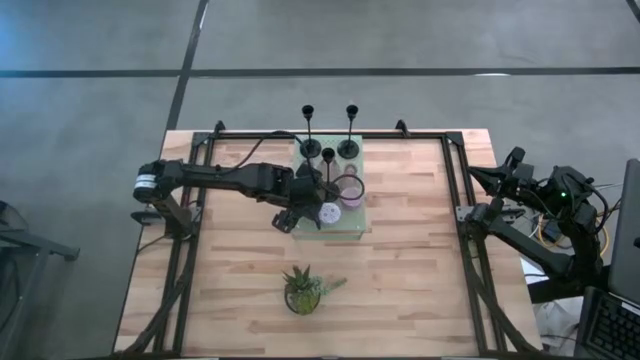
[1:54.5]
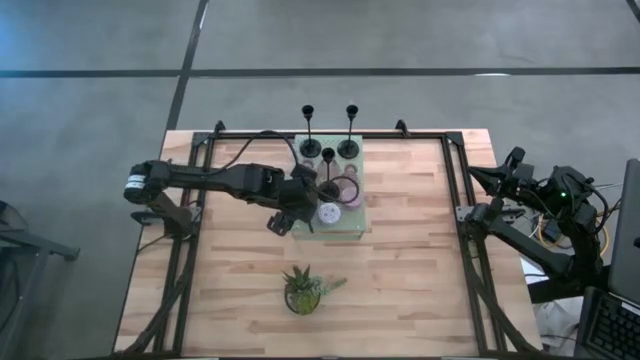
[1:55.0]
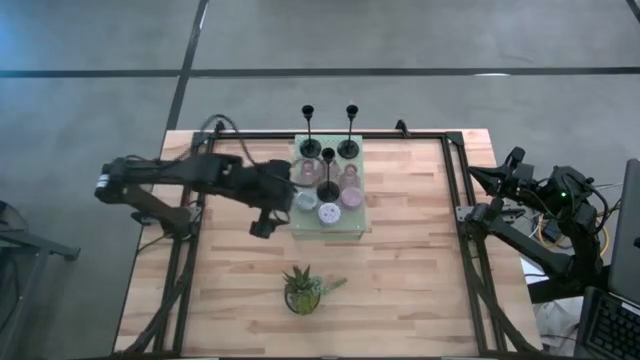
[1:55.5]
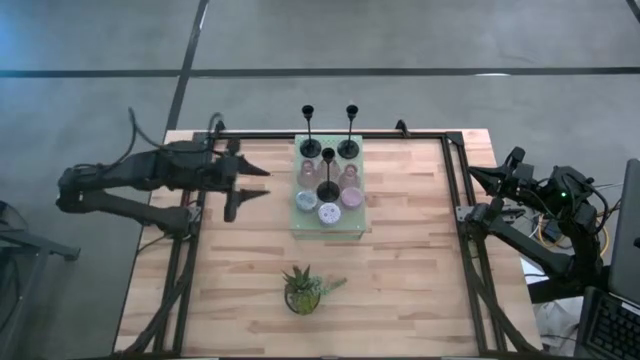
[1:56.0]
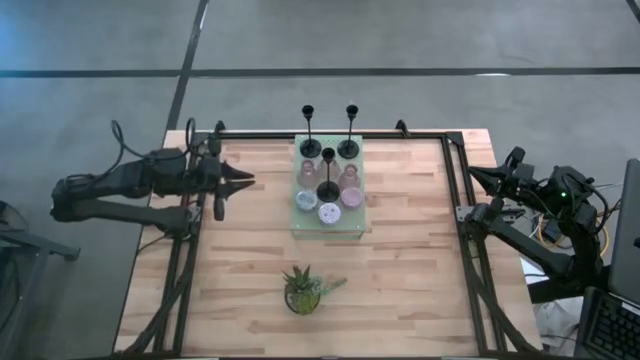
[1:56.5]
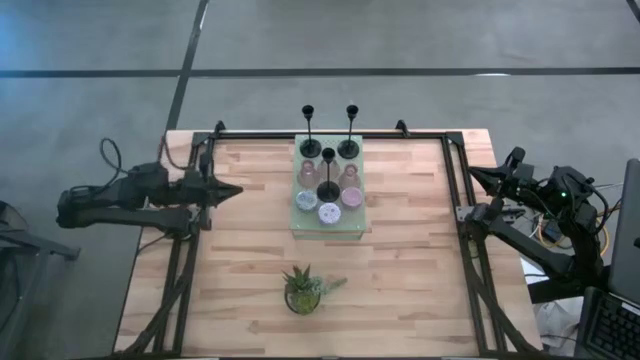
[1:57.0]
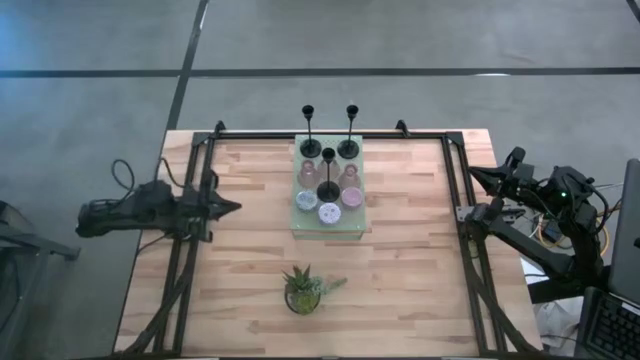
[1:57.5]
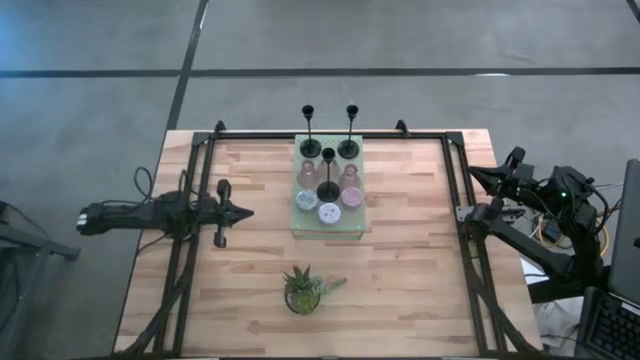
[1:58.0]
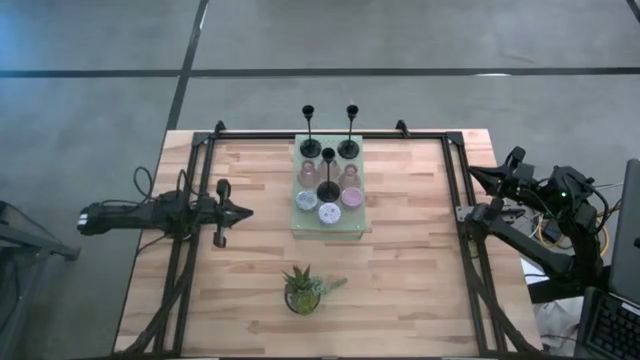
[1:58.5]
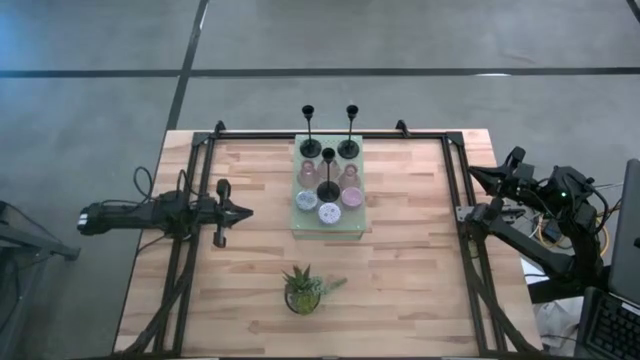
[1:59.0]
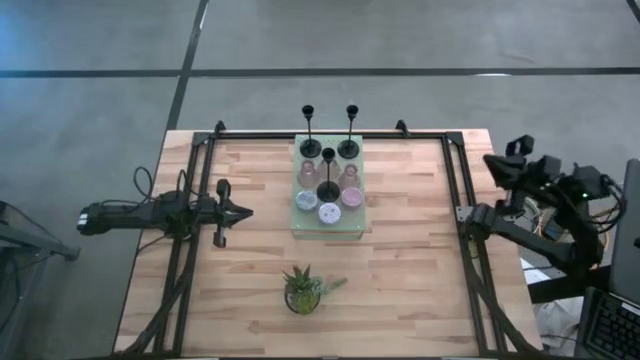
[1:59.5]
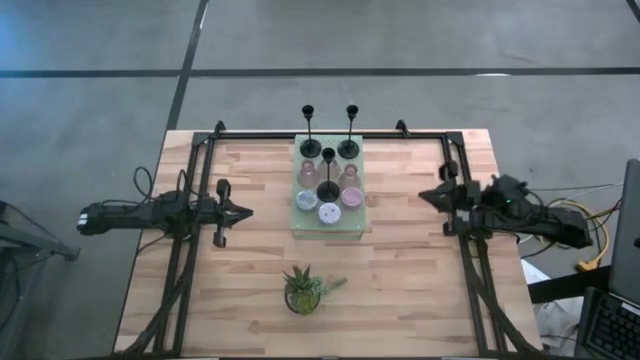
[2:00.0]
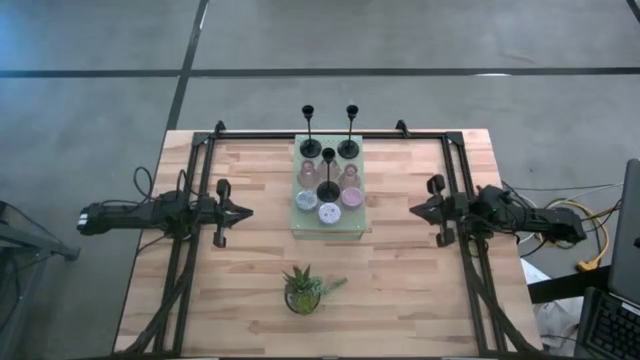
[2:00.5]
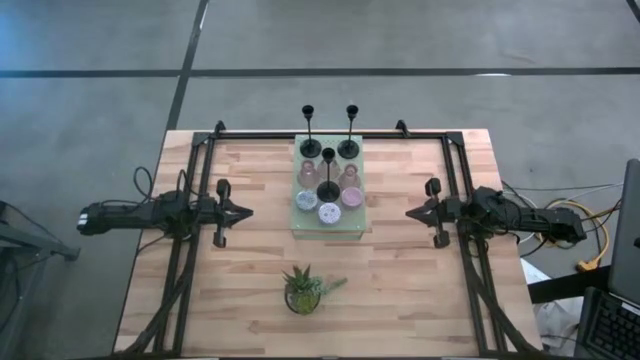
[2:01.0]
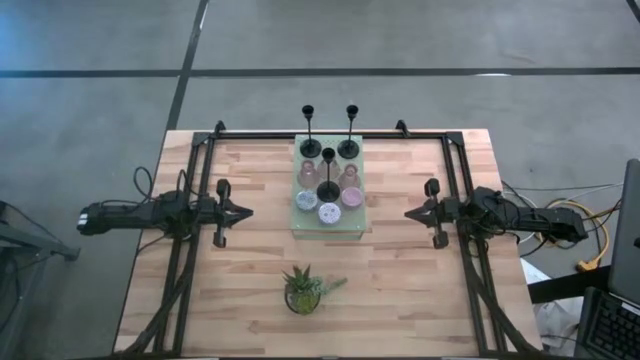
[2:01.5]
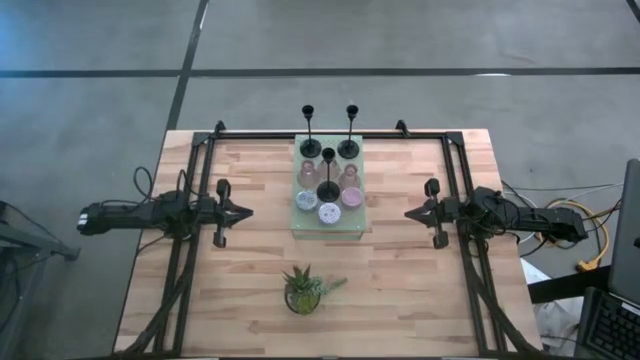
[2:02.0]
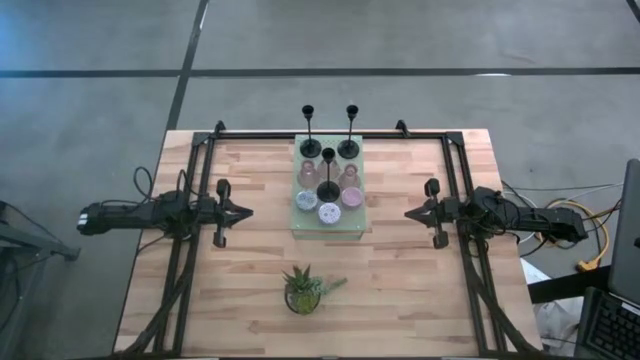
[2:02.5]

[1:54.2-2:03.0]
Task: Pick & Place candle stick holders
Return to Home Position

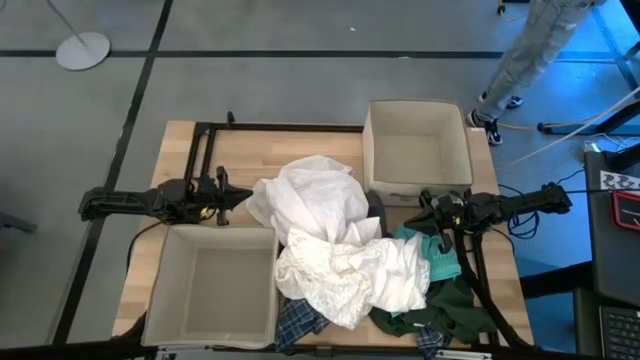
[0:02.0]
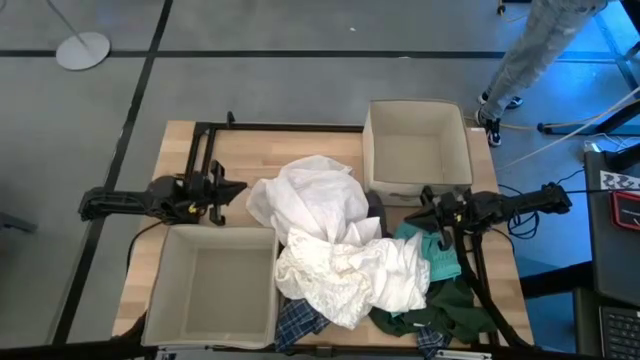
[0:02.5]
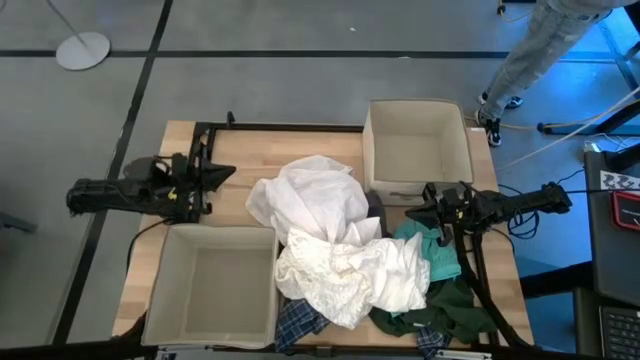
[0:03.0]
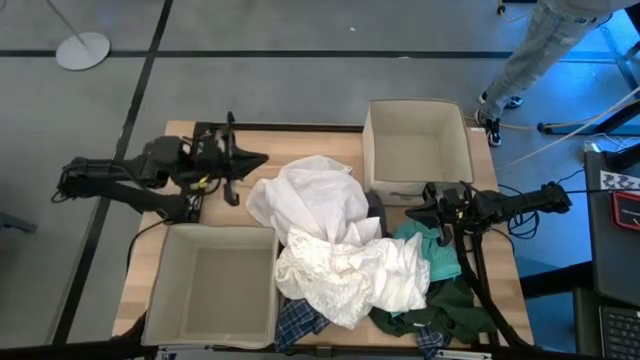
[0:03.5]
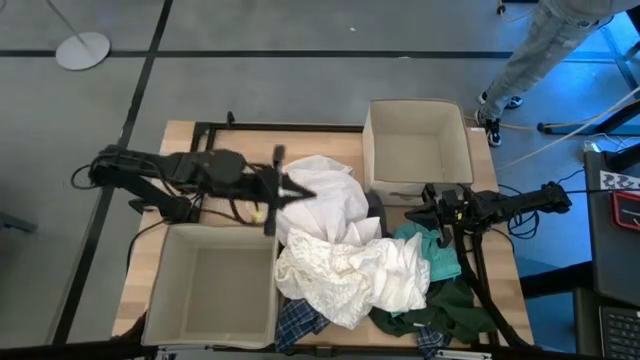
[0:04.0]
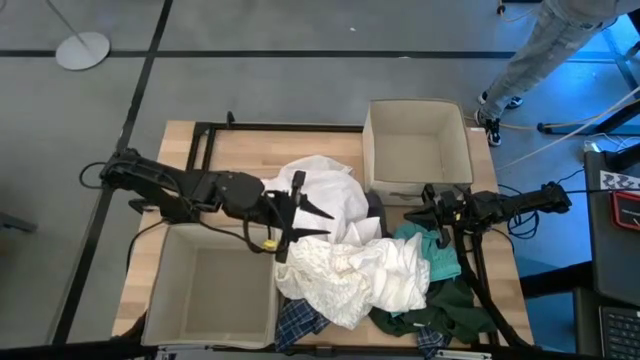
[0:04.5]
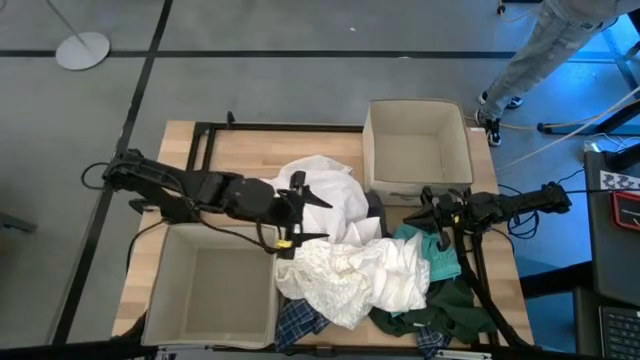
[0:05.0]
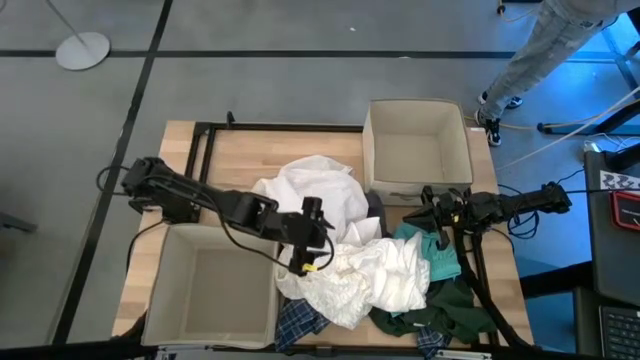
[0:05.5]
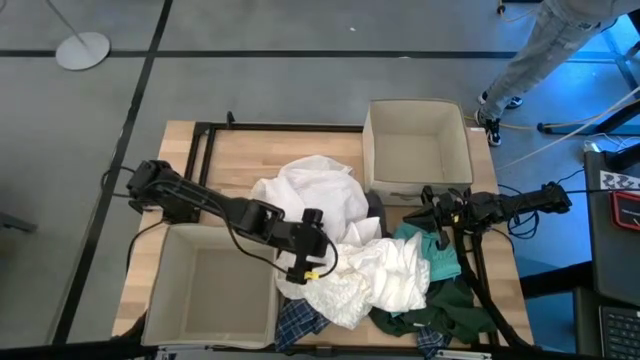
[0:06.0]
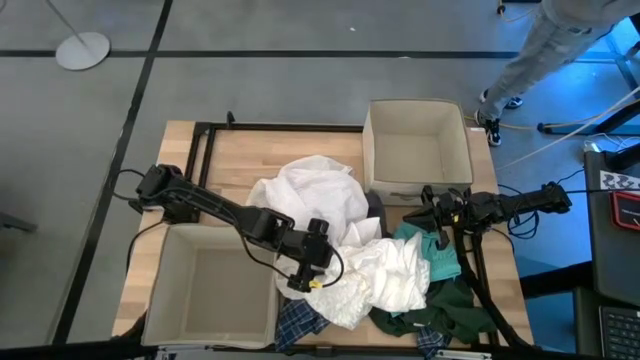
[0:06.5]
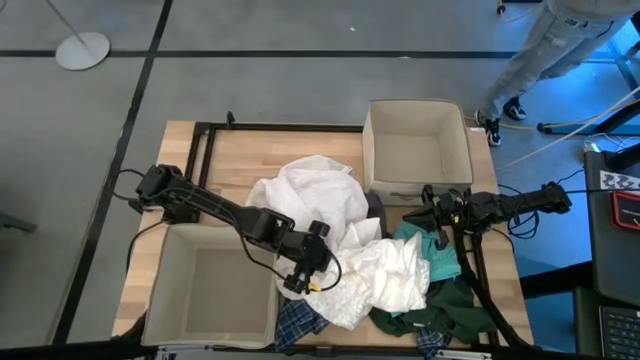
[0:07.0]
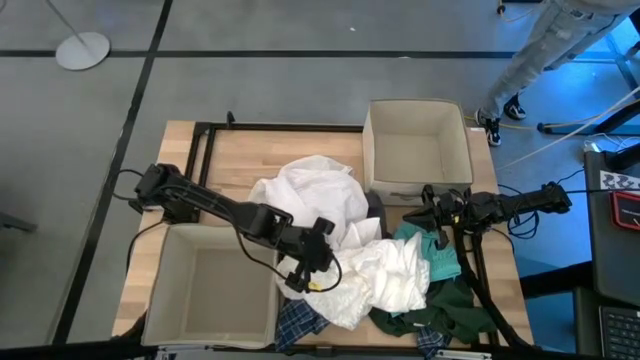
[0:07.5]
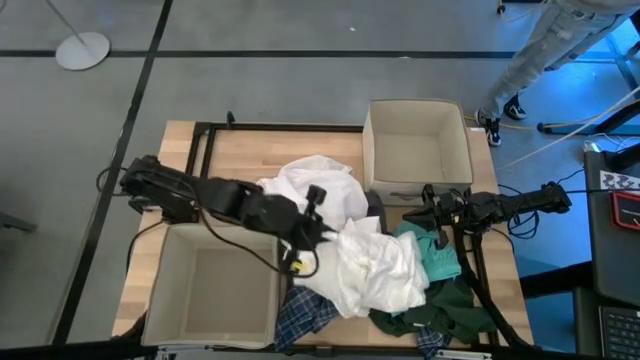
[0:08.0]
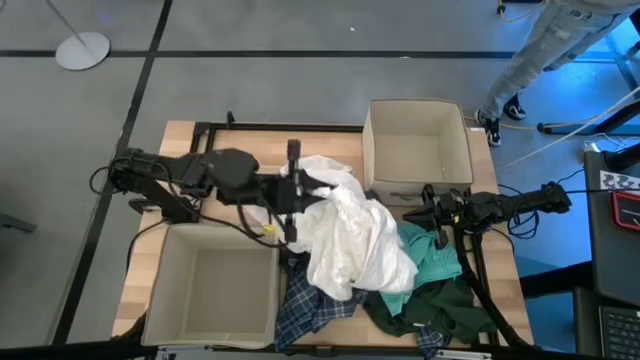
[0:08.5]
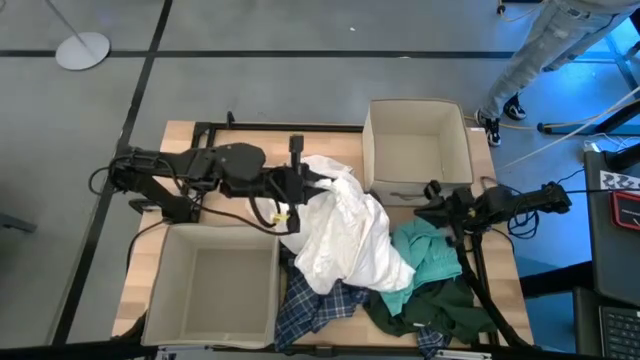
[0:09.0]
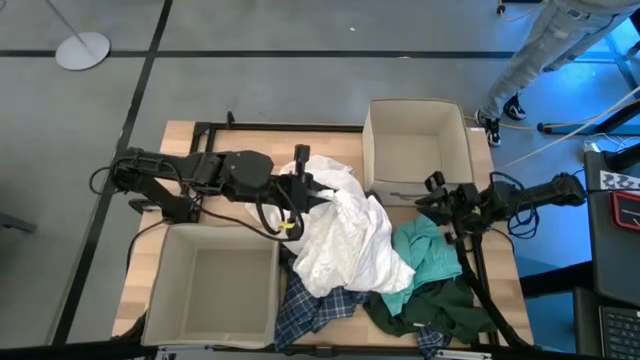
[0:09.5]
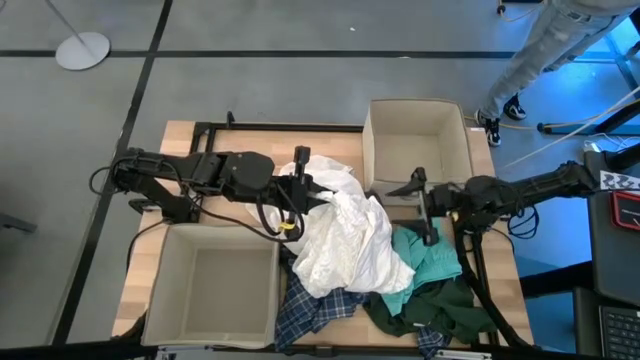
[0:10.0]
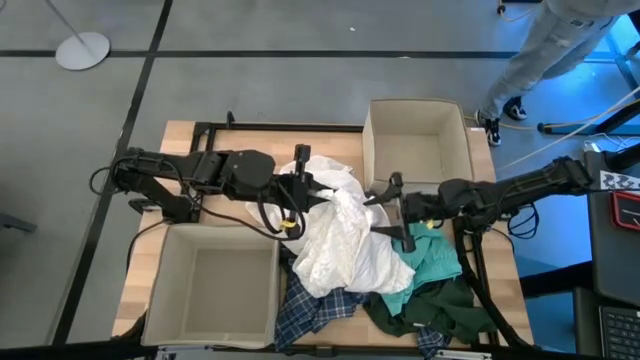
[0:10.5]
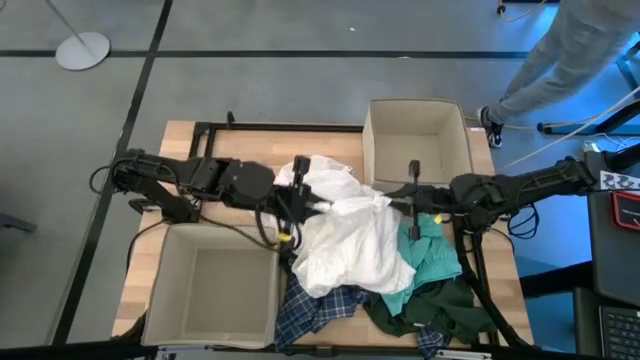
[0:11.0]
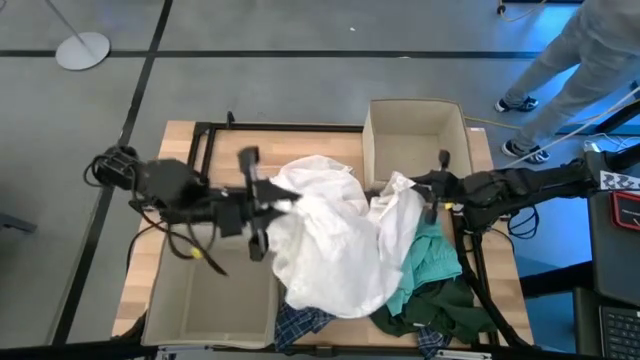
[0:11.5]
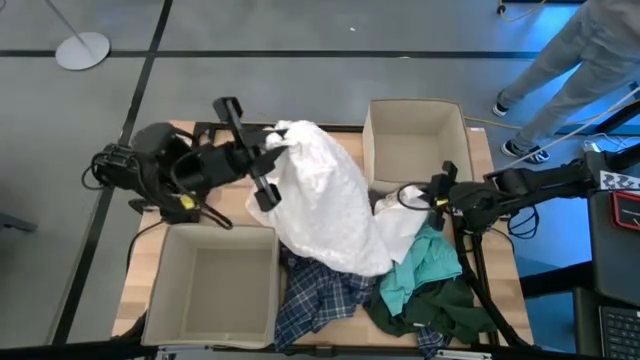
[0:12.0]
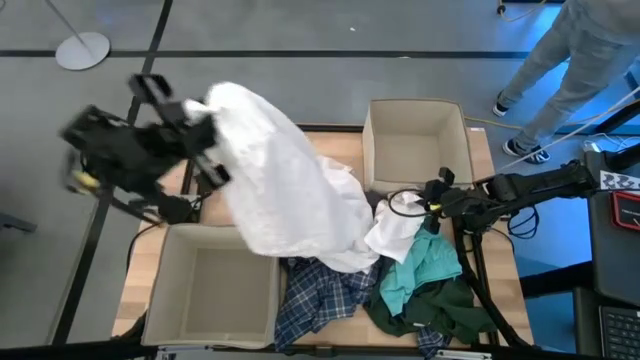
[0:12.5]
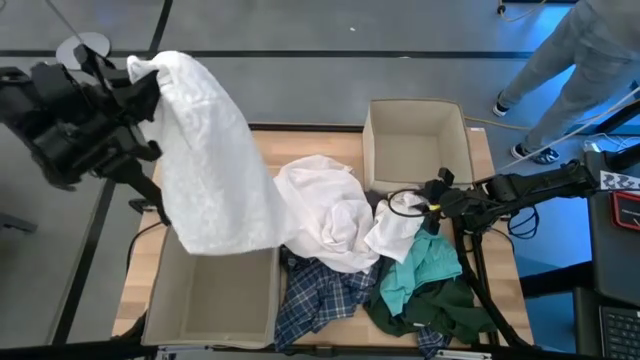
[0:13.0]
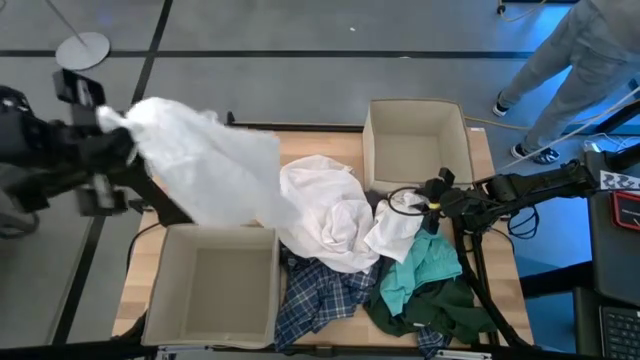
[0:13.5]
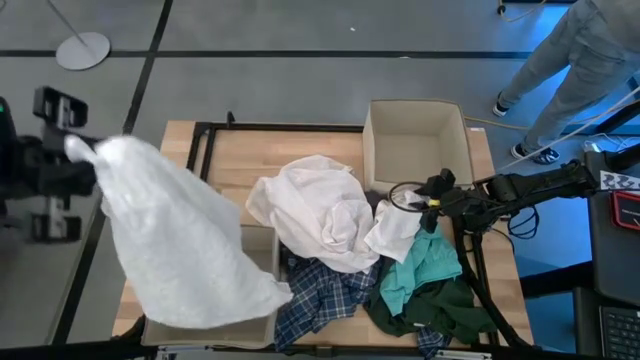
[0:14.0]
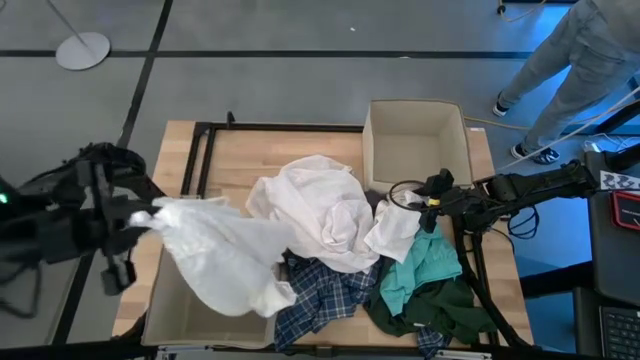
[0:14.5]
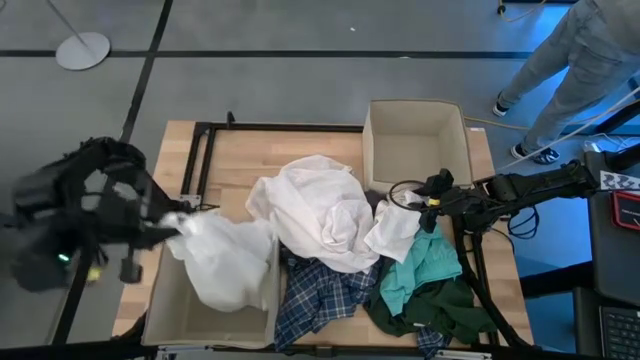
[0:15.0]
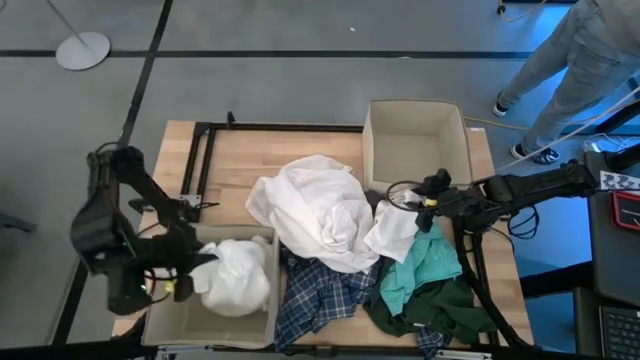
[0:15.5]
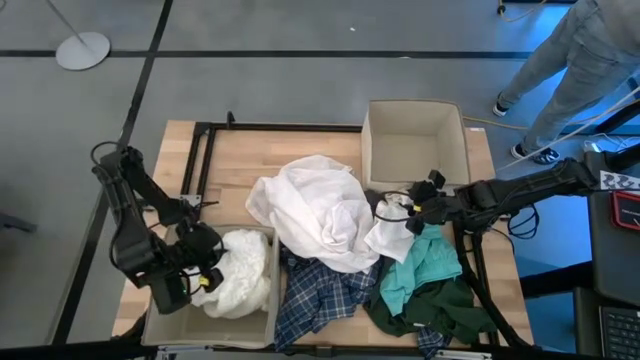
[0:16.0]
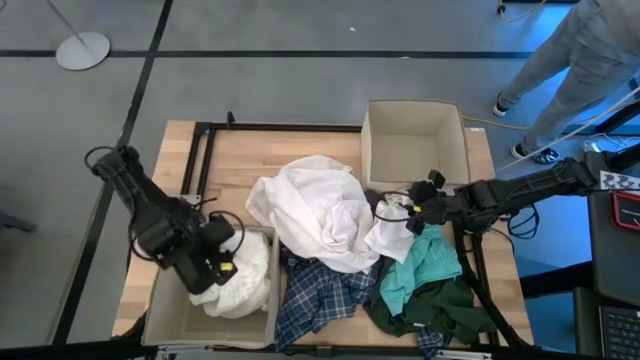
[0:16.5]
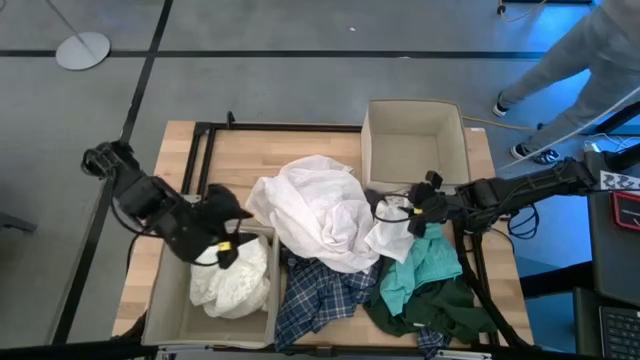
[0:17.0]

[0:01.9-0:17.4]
Task: Sort clothes
Put the top white shirt into the bottom left brown laundry bin
